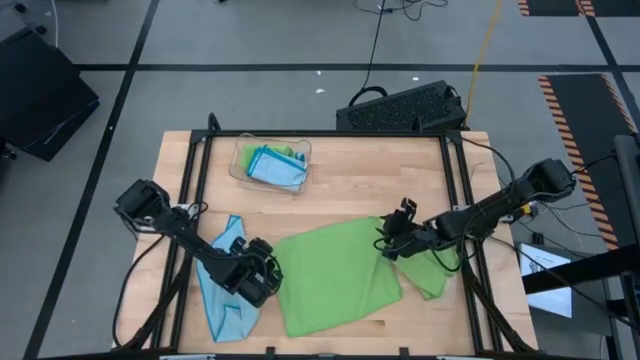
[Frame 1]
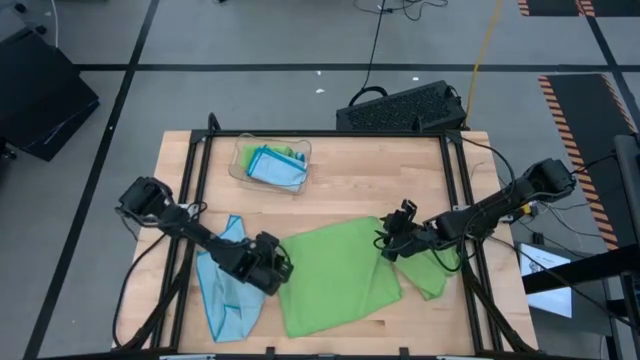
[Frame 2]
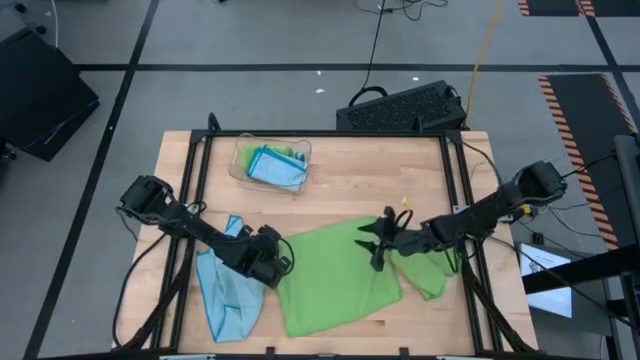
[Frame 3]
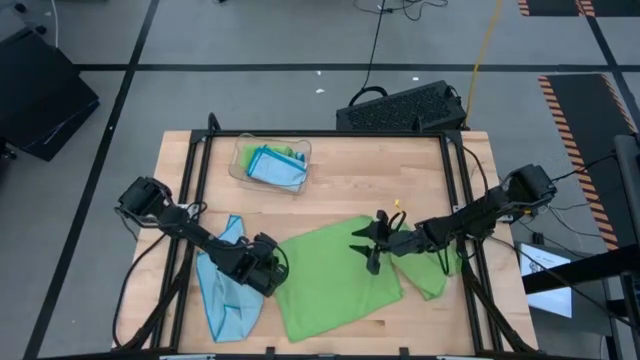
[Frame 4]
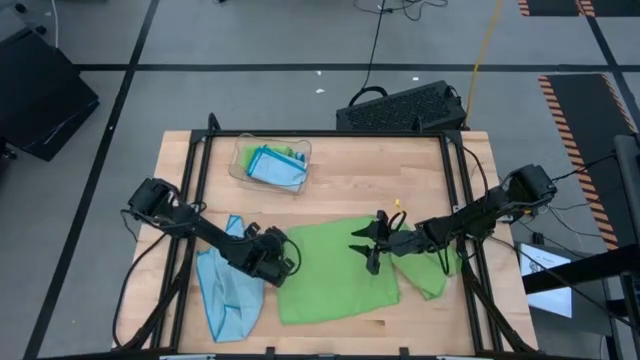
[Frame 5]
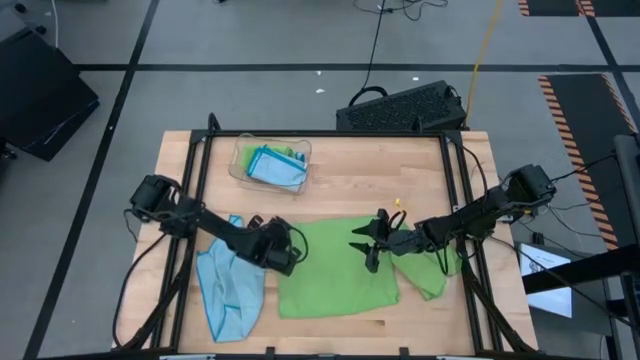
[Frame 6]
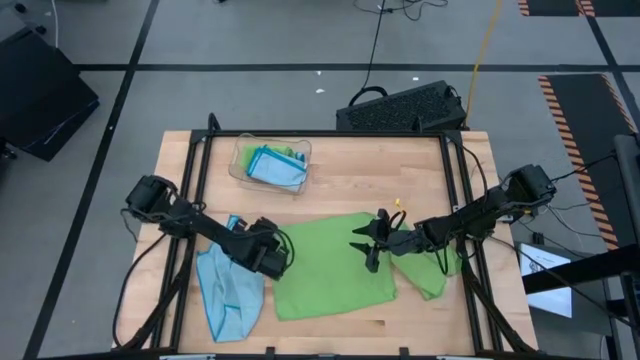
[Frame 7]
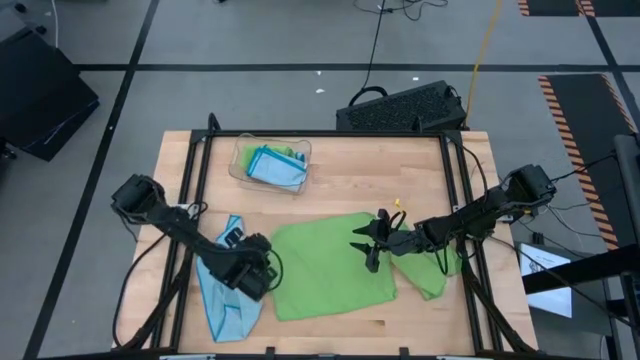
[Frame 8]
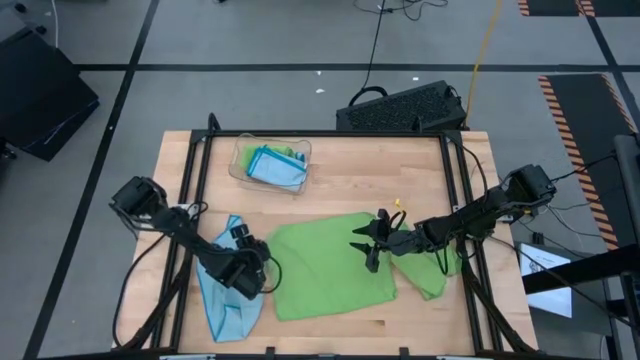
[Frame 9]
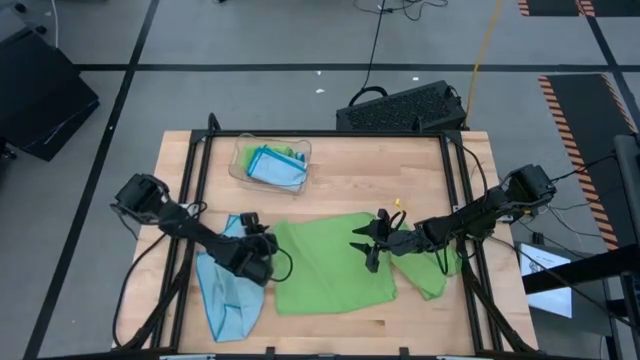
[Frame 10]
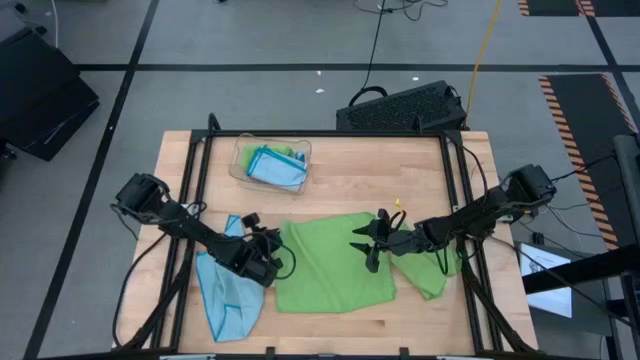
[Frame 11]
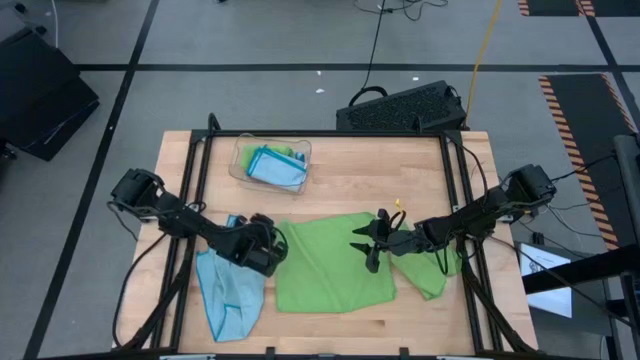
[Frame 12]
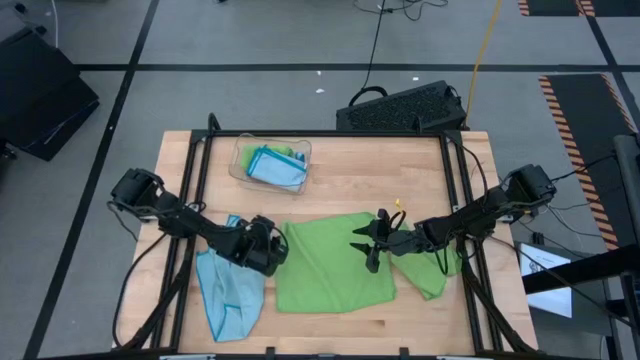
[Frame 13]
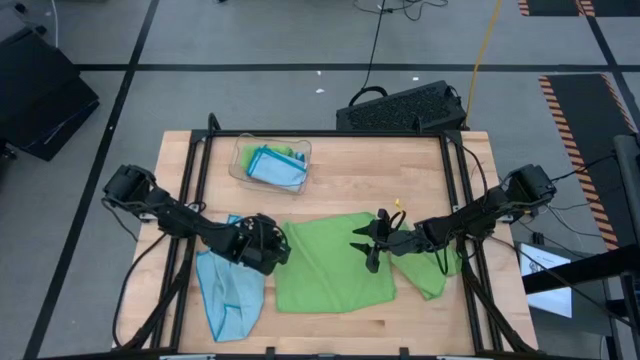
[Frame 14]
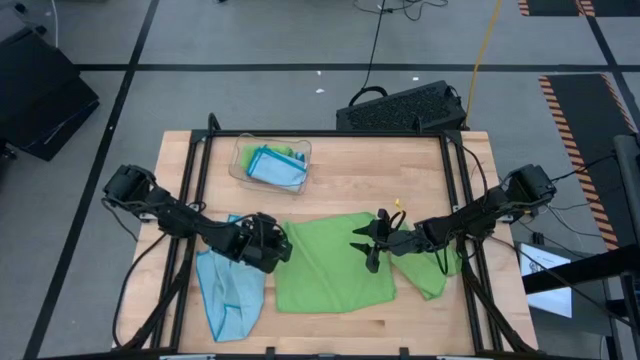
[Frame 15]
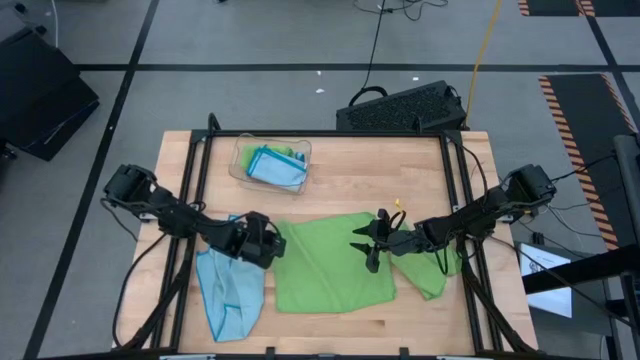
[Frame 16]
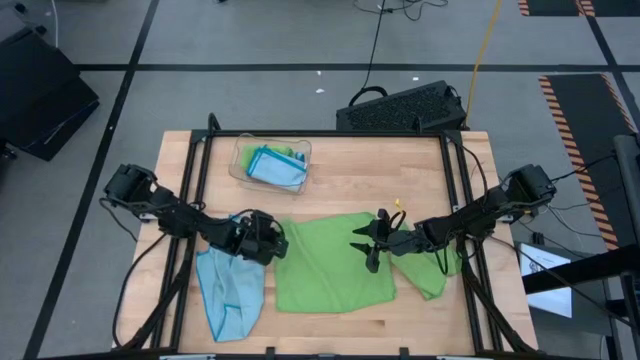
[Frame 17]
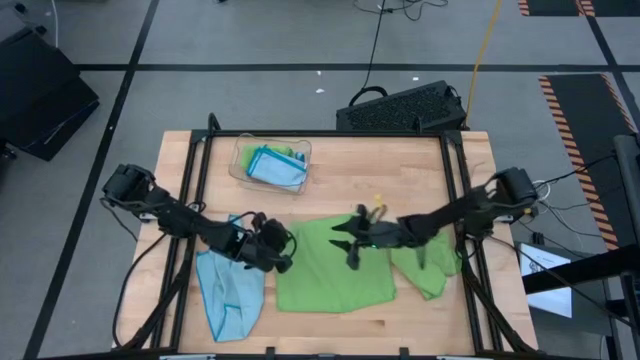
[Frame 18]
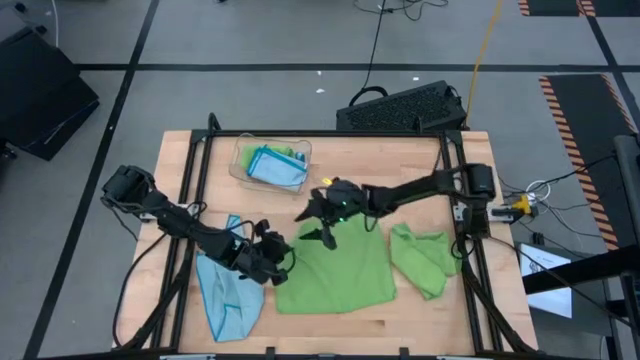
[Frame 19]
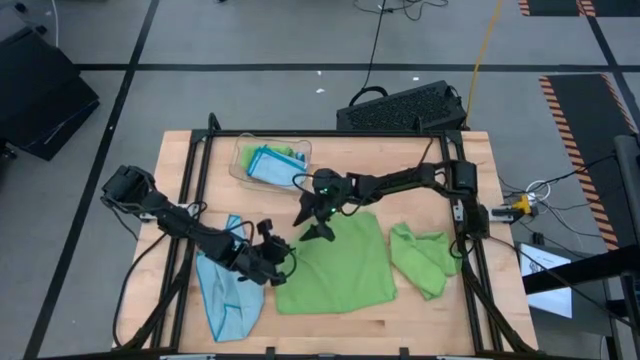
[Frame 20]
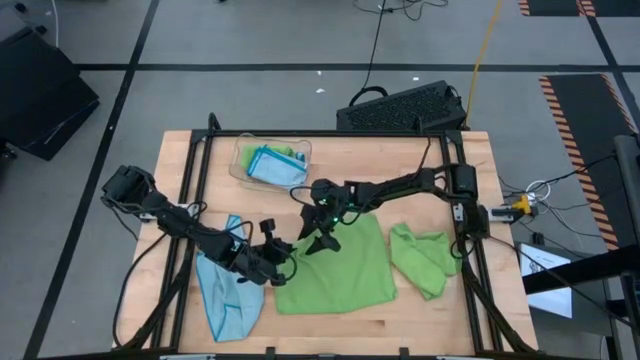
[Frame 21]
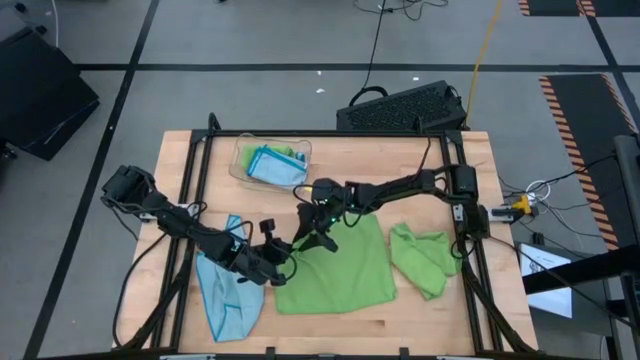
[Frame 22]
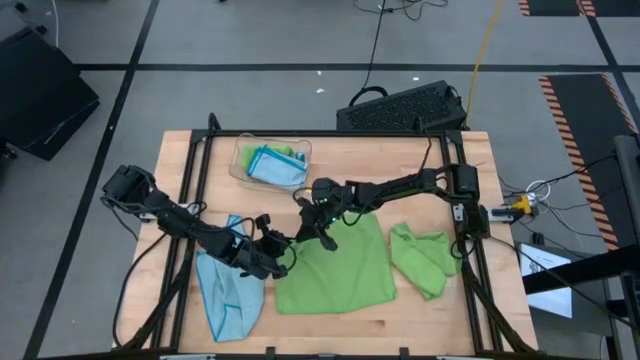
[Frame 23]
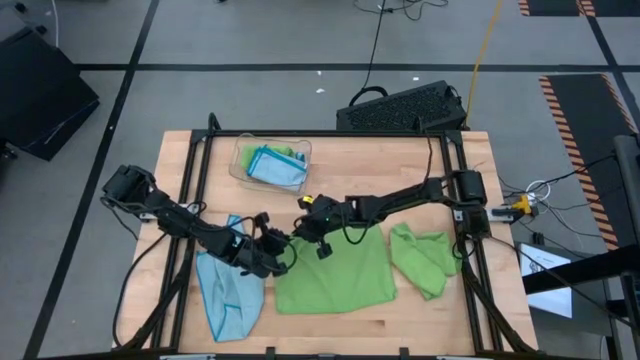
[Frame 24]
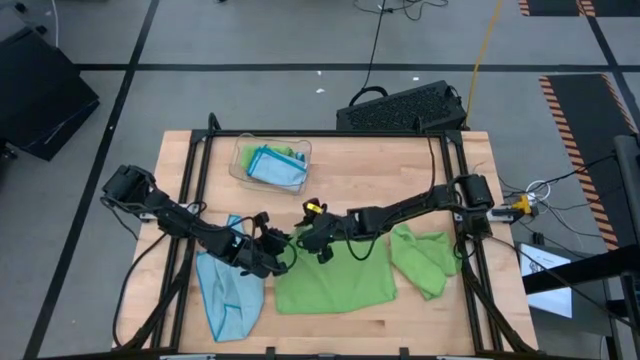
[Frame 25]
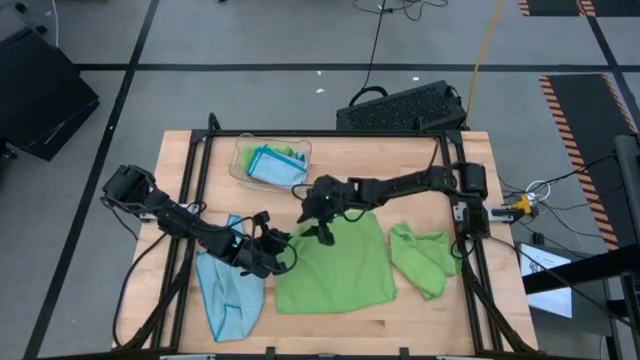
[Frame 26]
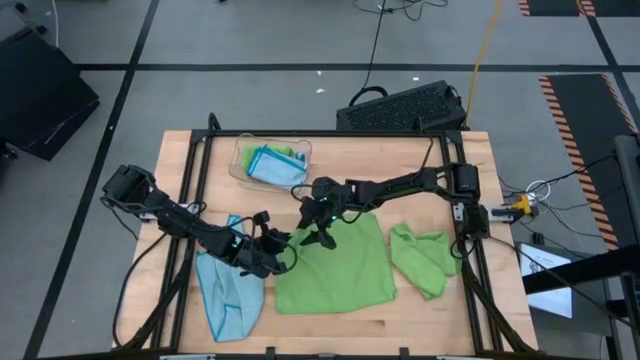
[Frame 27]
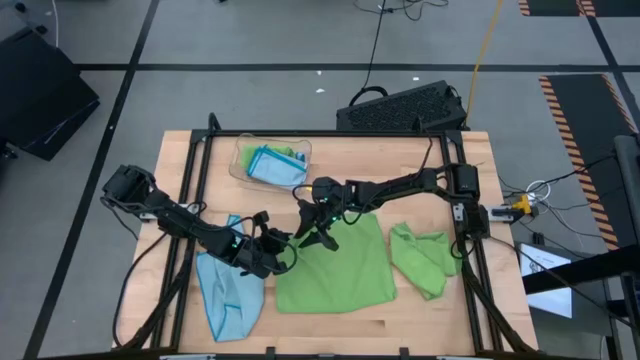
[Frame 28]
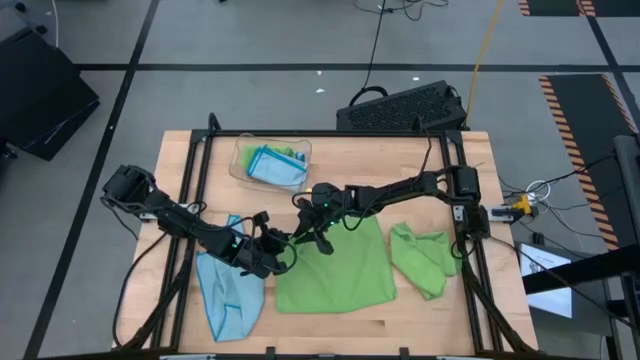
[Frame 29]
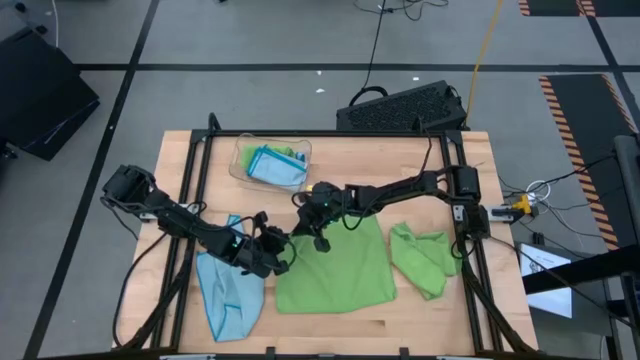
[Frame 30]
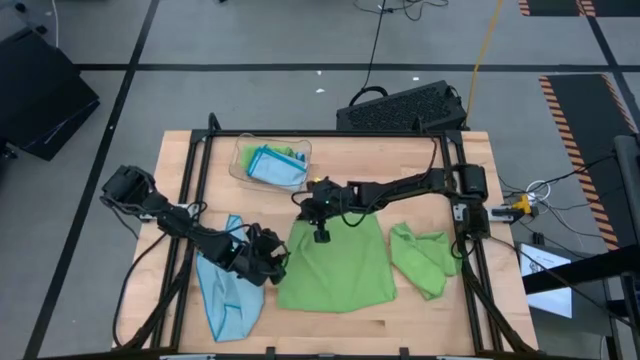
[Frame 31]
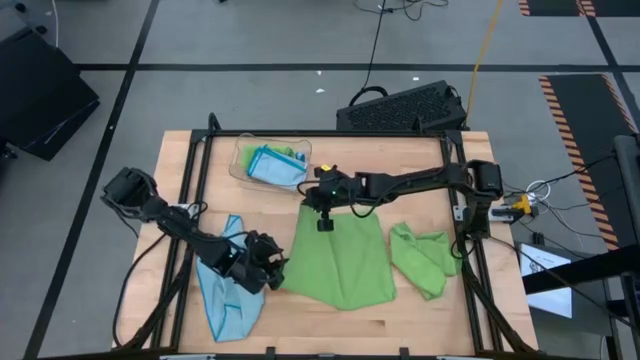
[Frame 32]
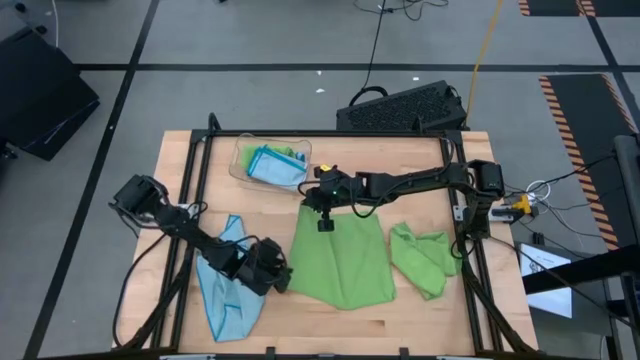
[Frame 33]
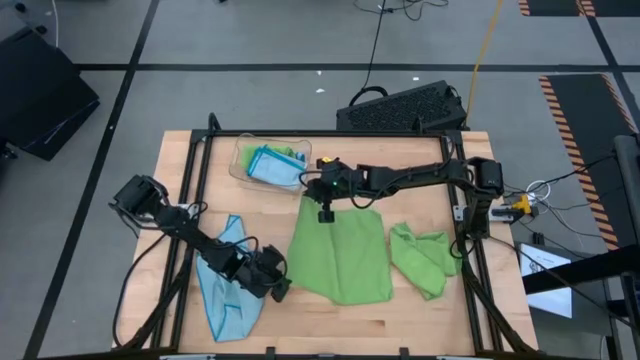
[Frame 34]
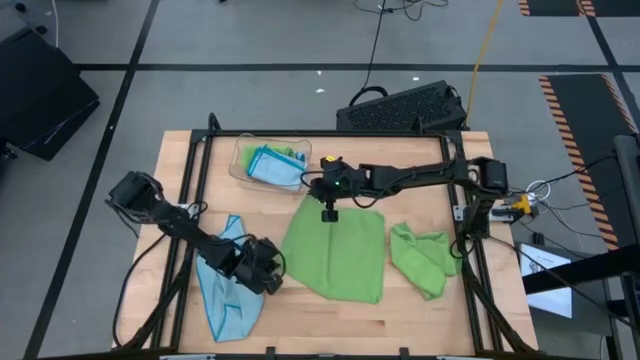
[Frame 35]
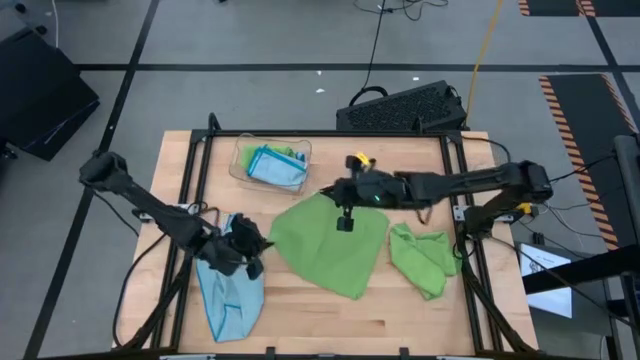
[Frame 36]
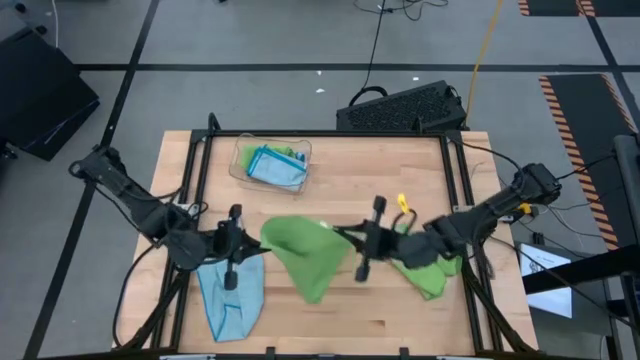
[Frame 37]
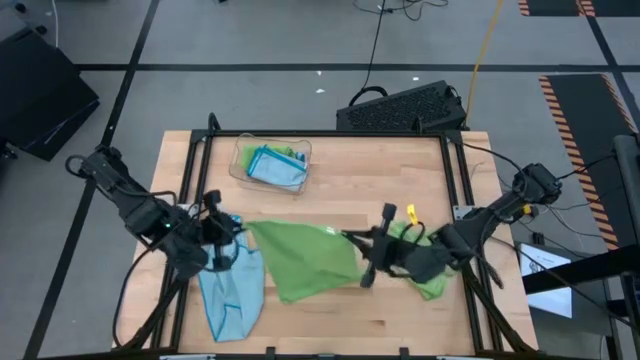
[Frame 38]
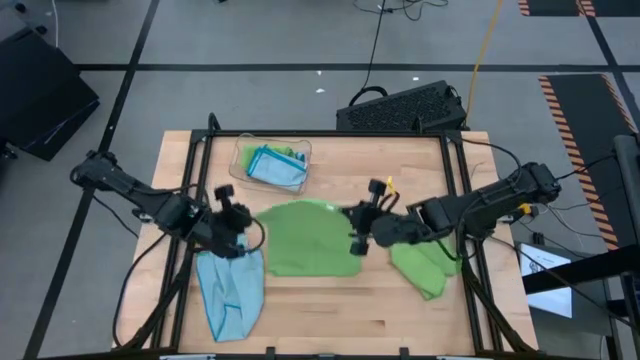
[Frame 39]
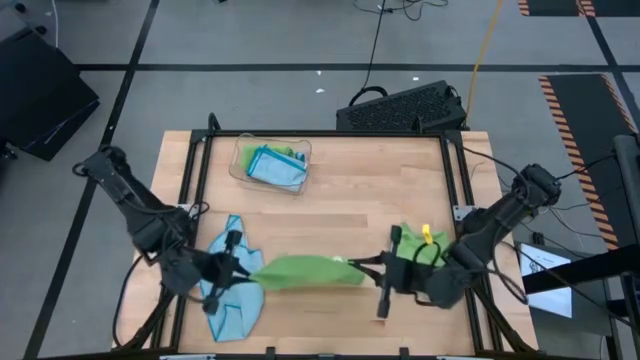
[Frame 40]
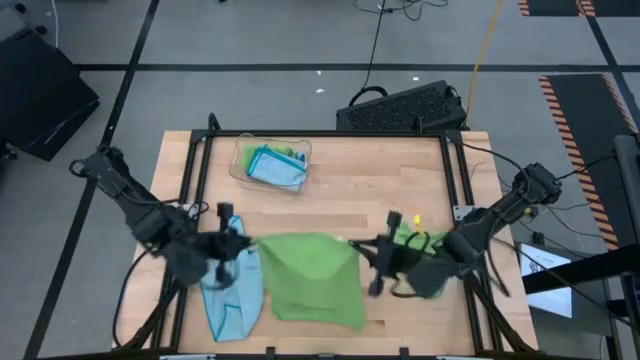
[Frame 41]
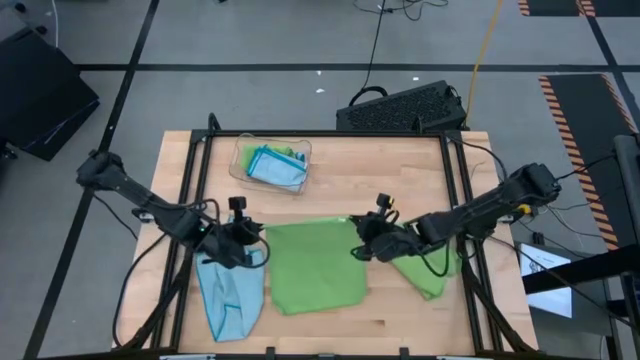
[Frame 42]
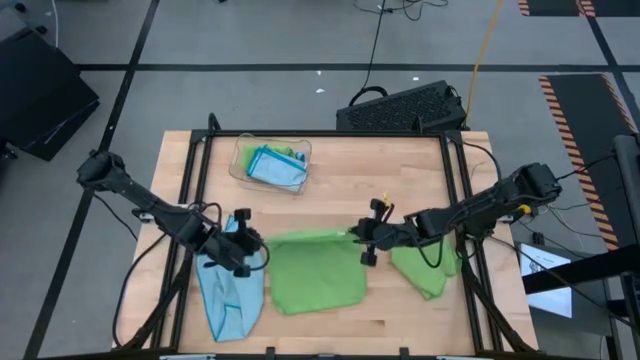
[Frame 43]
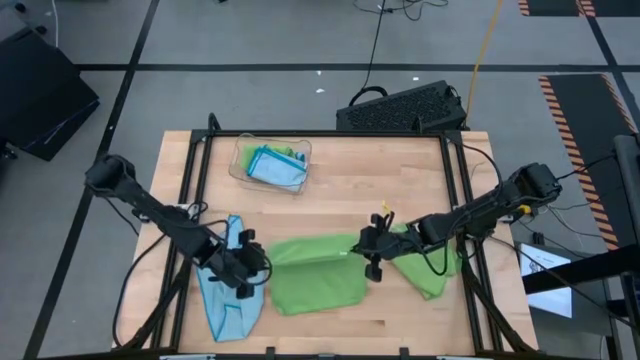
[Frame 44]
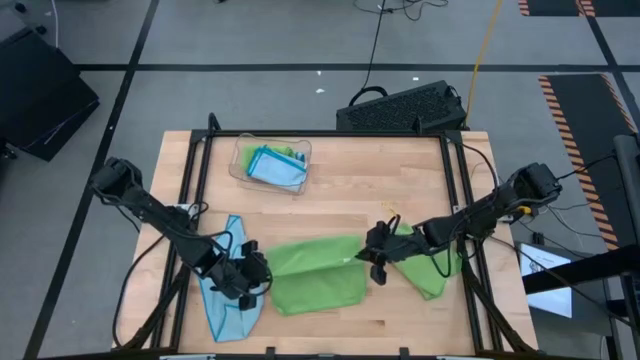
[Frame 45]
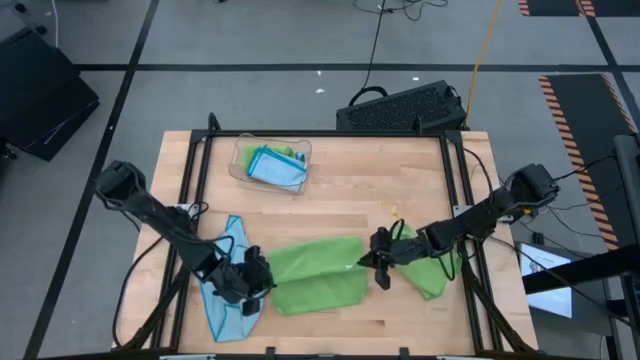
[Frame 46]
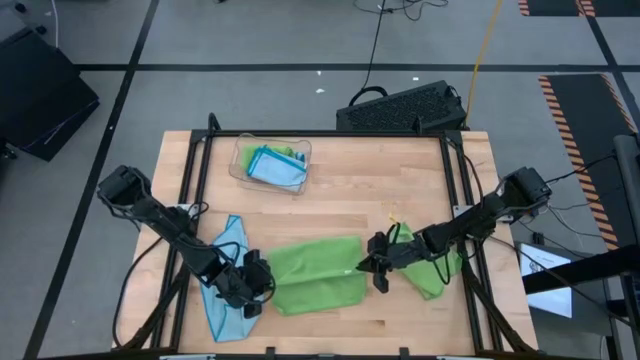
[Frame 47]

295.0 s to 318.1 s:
Task: Fold microfiber towels
Fold the top green microfiber cloth
